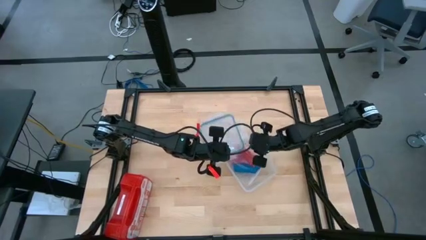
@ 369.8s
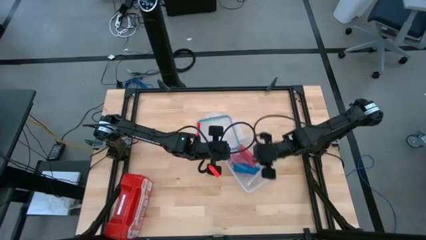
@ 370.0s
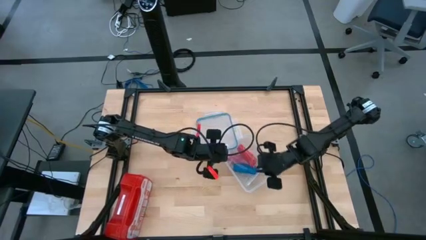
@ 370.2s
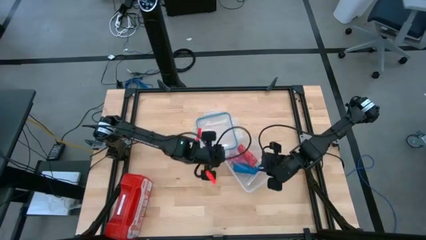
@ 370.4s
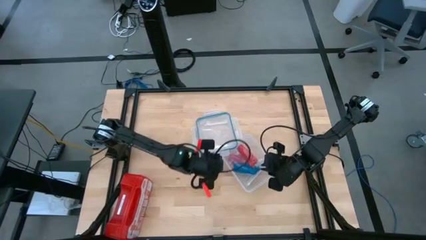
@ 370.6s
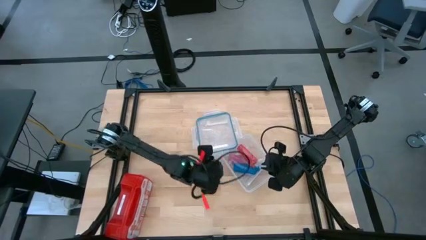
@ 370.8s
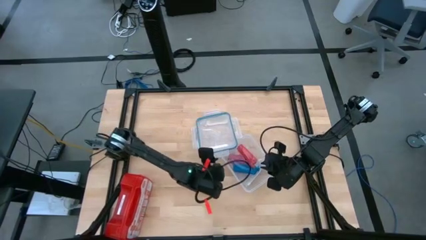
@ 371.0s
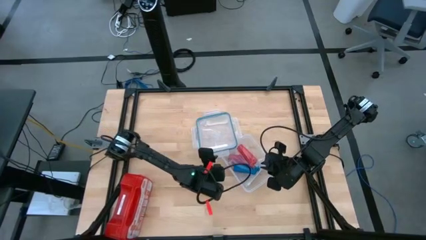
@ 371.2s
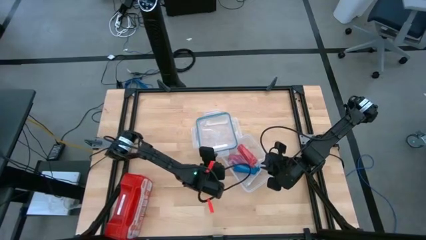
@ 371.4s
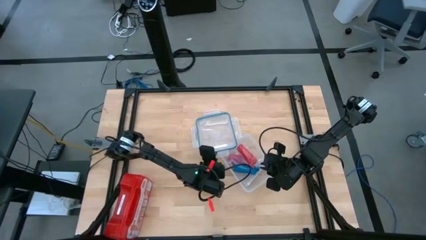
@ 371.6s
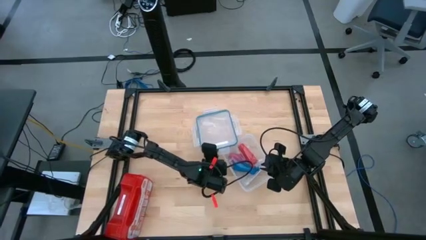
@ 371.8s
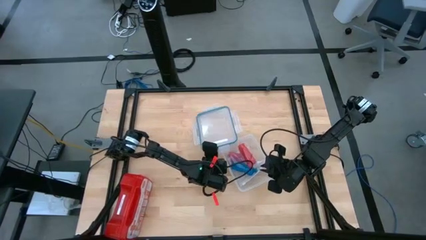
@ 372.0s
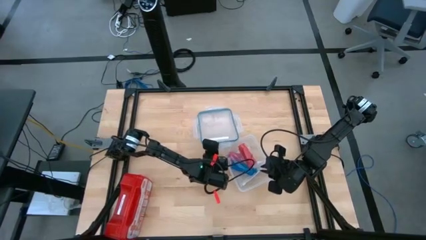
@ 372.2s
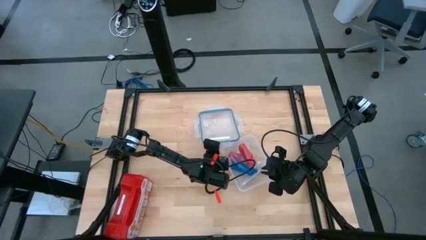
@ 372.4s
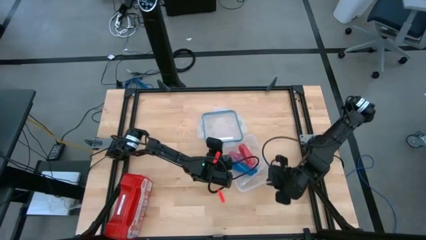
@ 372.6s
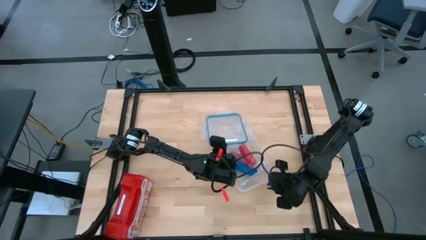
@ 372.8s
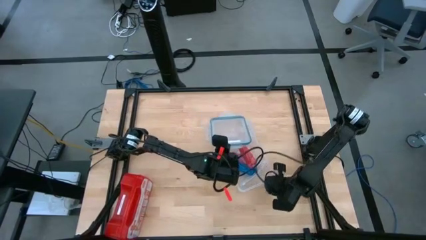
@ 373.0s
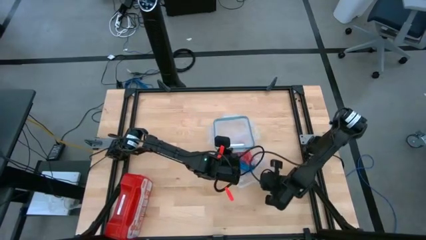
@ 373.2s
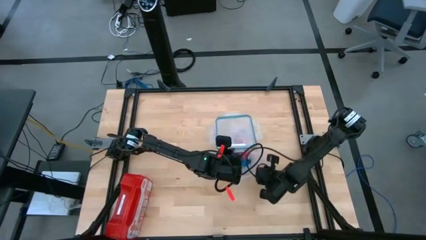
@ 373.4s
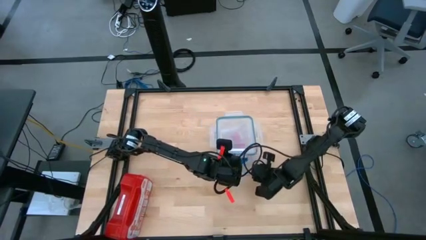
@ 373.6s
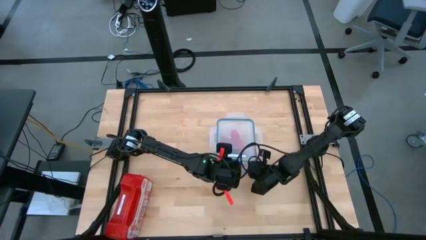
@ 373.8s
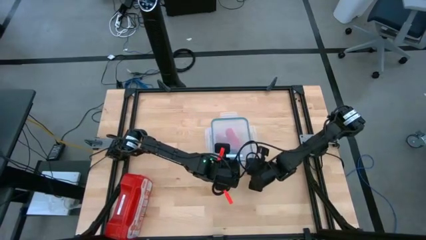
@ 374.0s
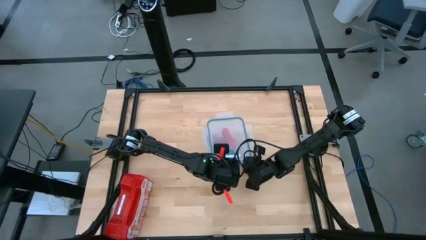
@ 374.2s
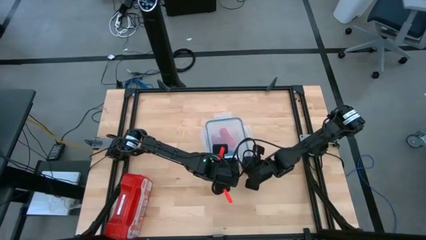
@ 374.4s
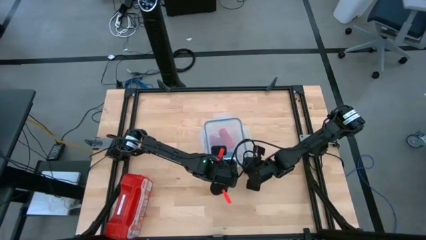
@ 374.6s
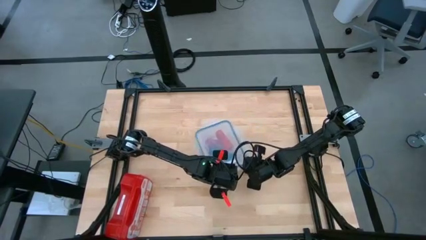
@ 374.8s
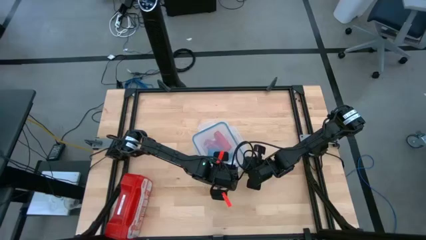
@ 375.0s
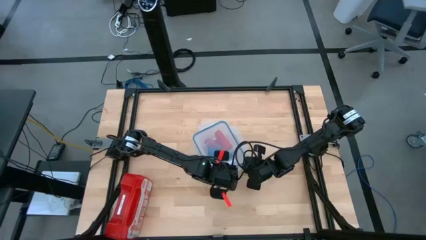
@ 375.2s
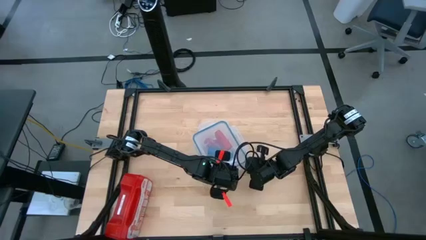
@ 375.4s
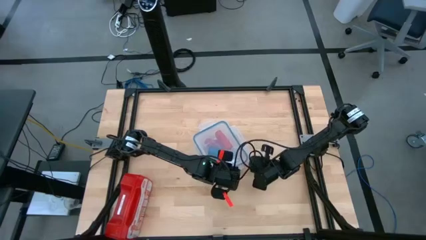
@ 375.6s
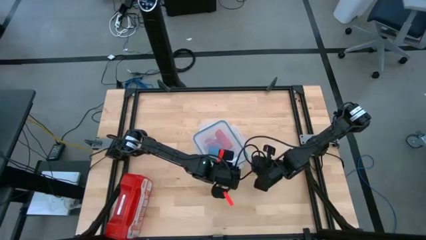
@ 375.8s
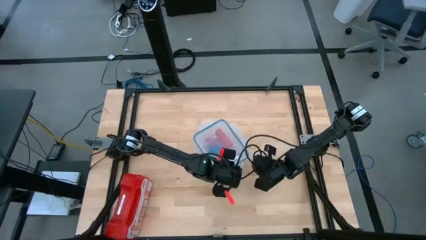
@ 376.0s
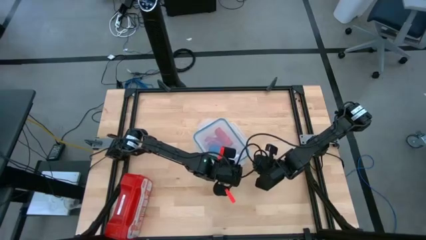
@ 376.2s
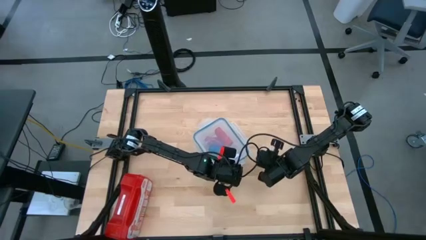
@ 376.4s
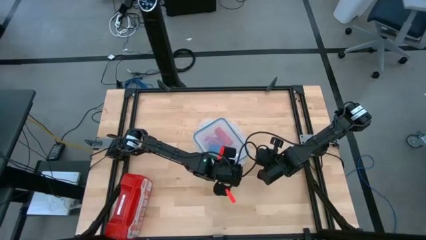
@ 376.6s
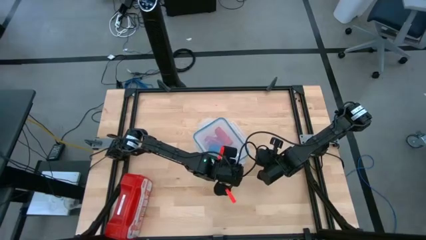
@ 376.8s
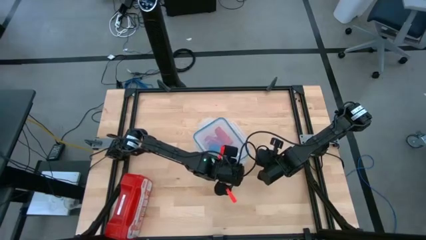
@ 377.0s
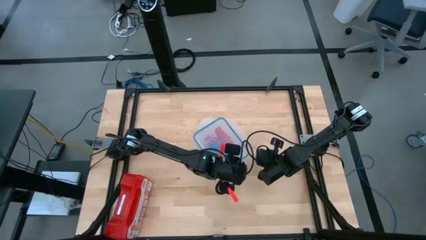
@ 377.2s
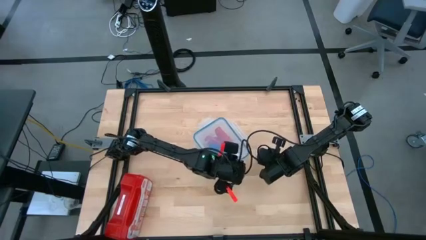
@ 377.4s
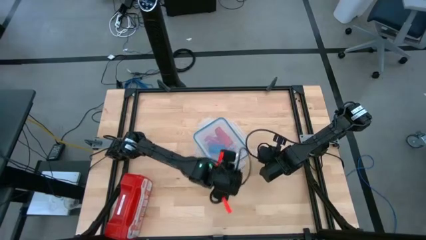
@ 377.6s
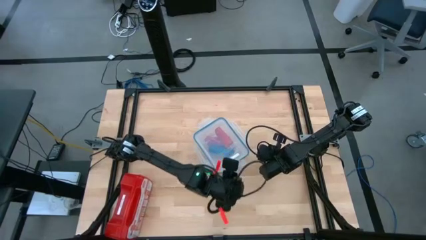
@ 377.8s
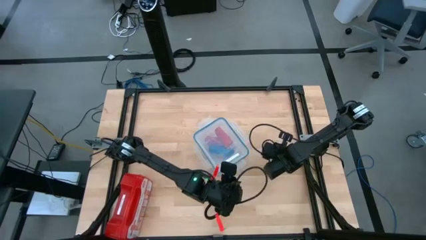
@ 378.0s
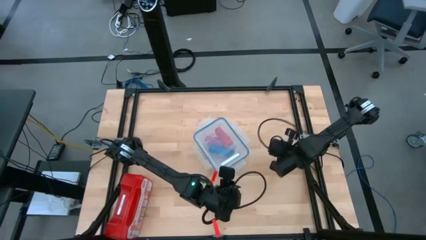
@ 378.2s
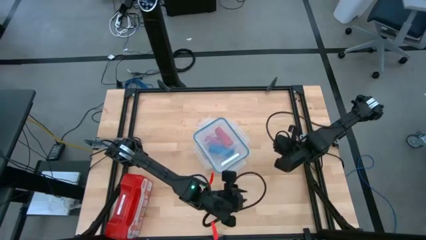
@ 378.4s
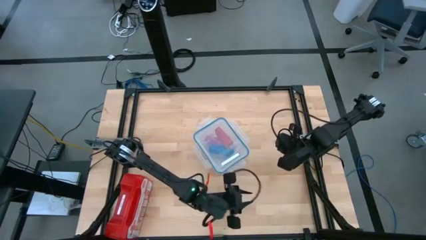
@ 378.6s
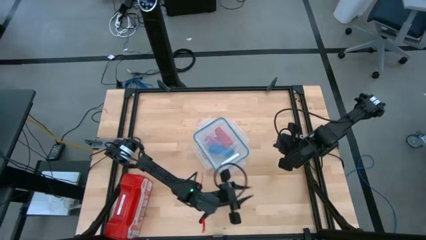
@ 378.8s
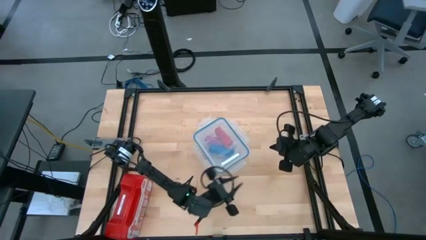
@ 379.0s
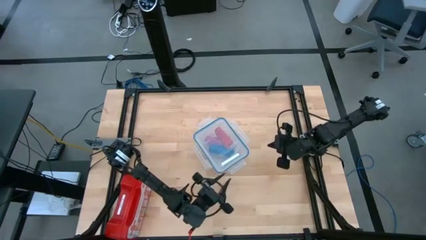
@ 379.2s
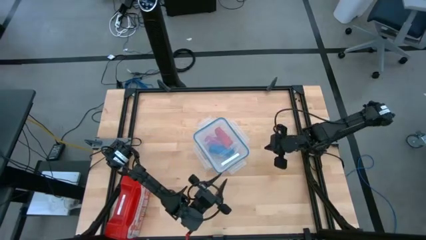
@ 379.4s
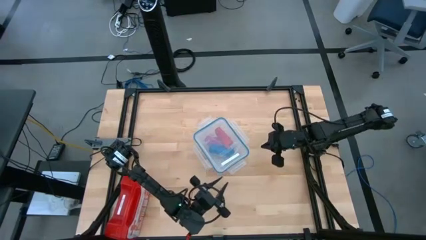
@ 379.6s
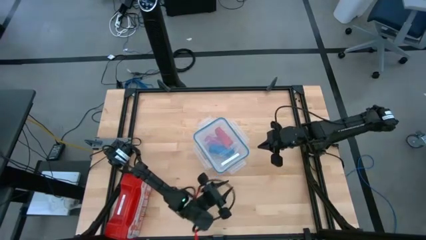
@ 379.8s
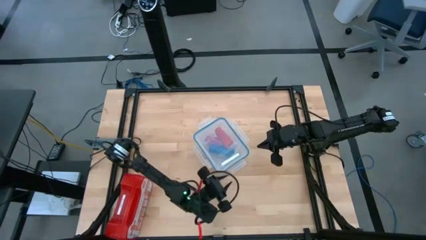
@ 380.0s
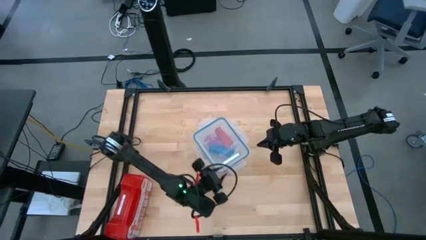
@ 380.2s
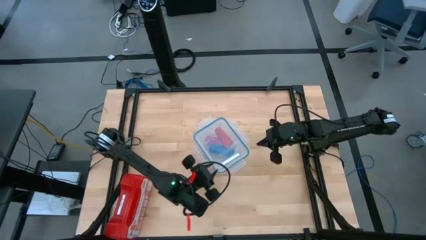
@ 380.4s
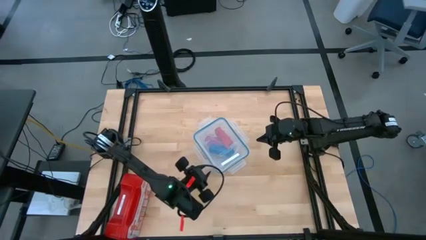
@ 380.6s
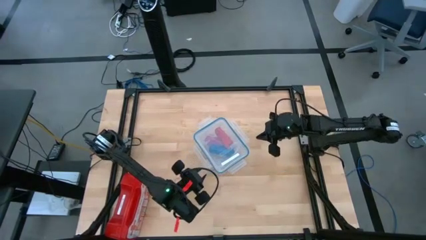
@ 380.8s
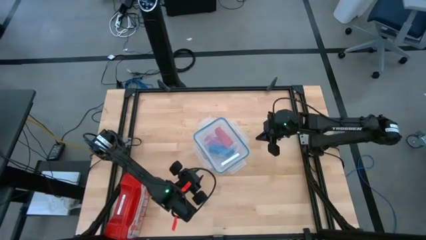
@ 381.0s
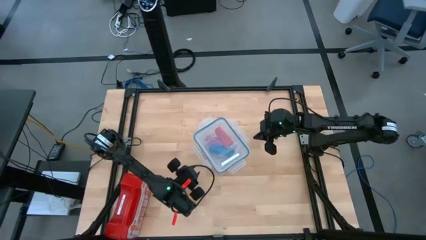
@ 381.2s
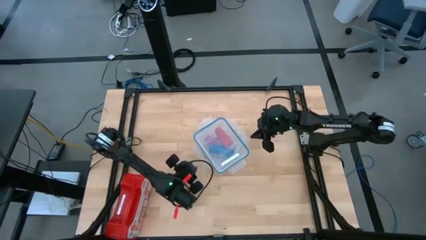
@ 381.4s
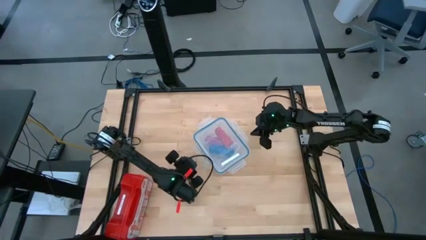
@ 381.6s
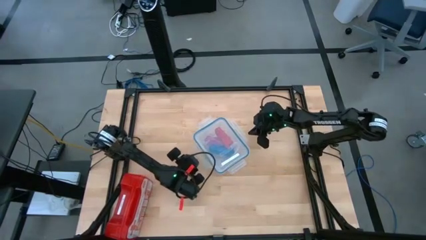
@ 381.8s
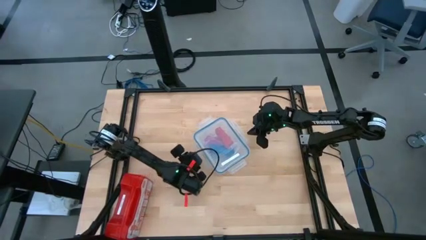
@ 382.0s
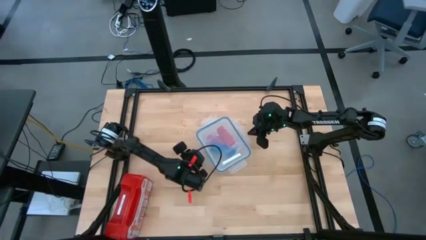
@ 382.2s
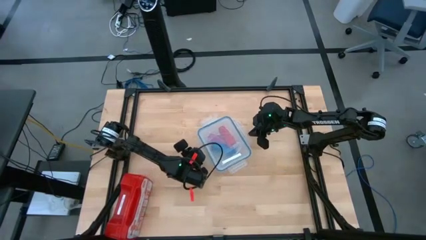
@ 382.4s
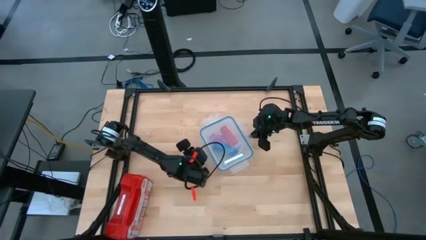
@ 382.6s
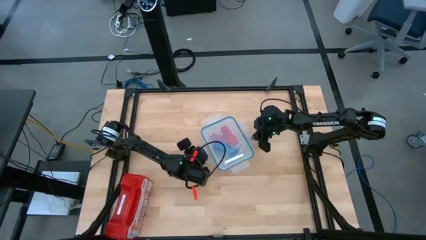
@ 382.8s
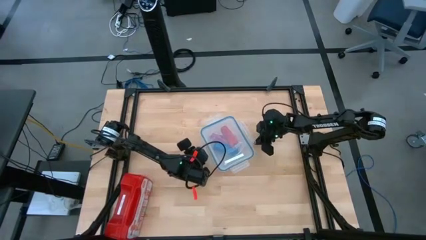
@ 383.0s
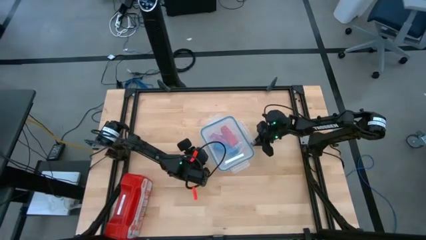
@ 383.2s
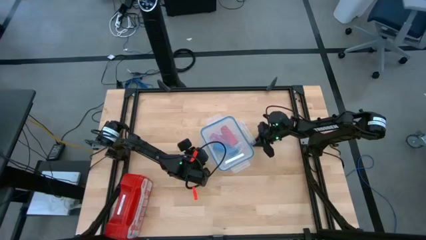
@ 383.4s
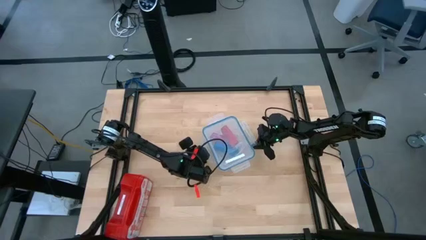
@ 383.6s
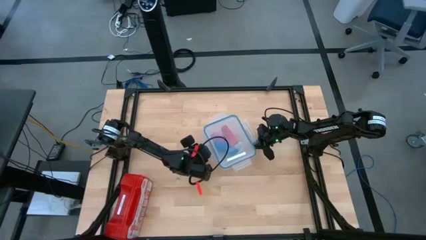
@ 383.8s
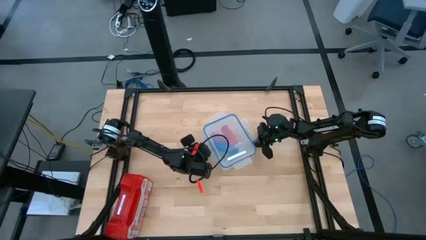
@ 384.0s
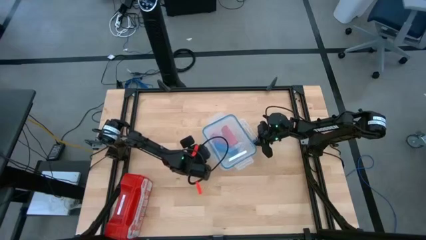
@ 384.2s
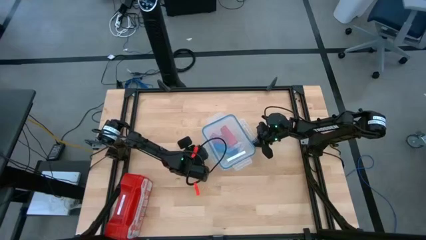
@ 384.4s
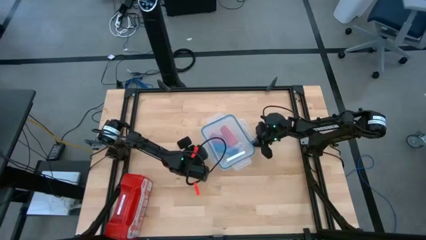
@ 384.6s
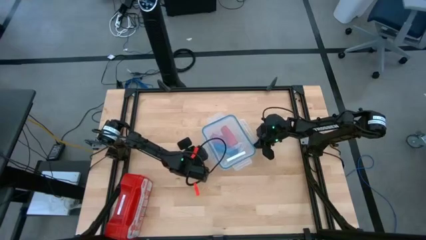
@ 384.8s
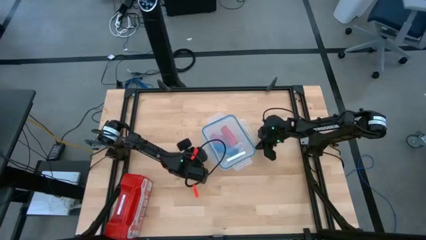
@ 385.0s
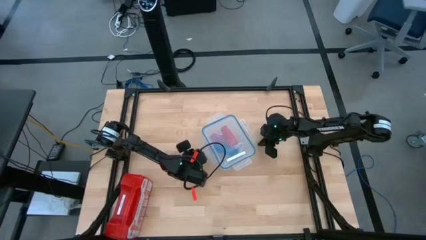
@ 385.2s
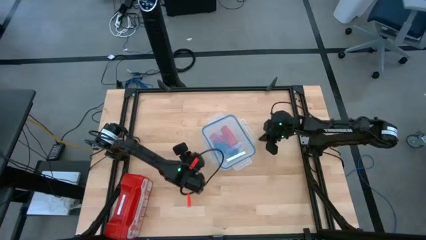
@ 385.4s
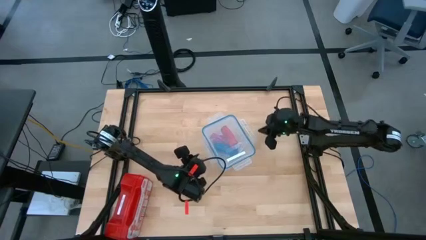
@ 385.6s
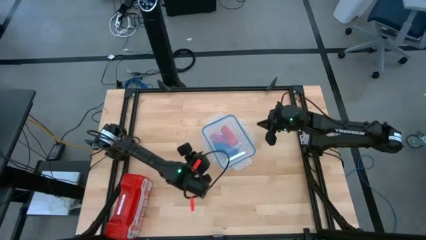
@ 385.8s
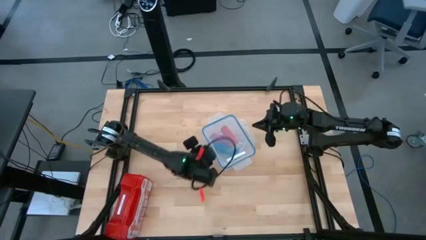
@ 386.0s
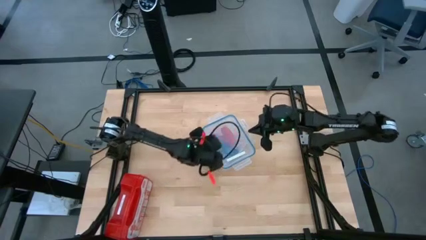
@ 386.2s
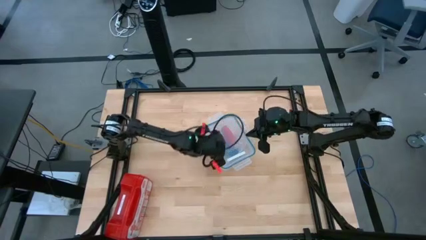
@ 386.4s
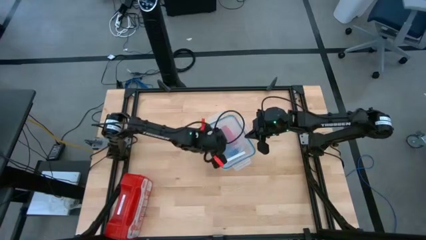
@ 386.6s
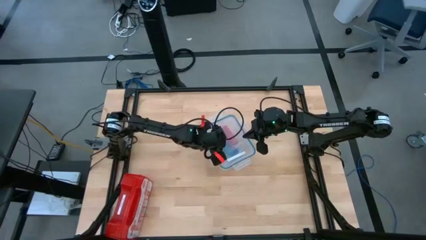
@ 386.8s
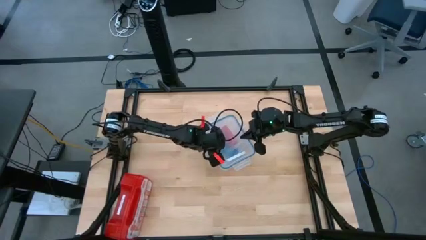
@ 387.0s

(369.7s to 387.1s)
Task: Roll bandage
Close the transparent container
